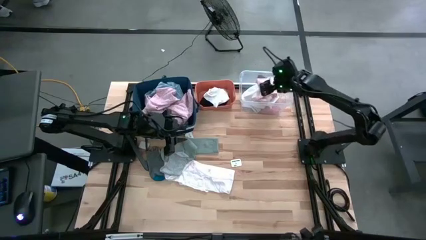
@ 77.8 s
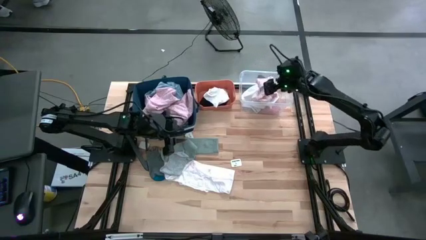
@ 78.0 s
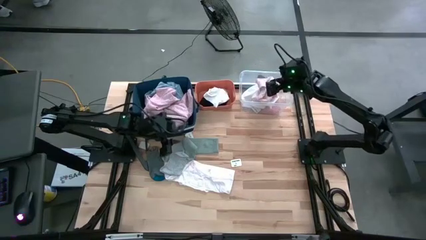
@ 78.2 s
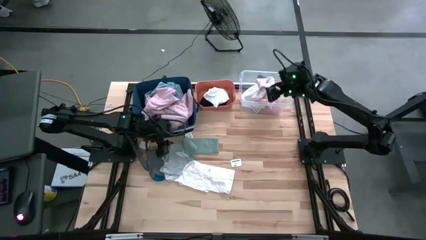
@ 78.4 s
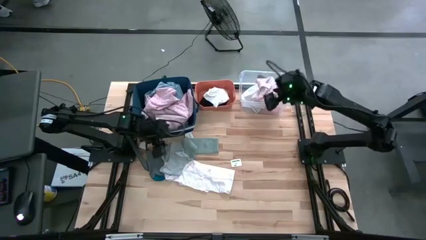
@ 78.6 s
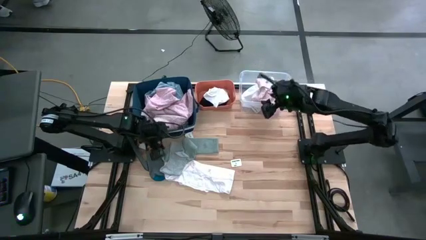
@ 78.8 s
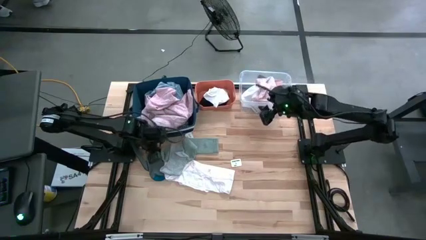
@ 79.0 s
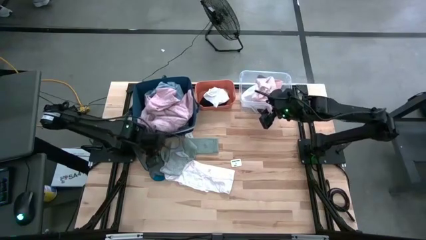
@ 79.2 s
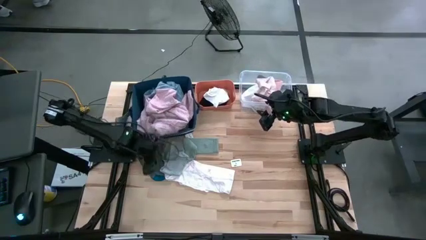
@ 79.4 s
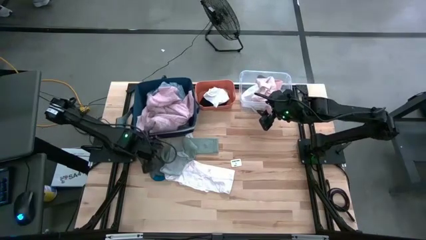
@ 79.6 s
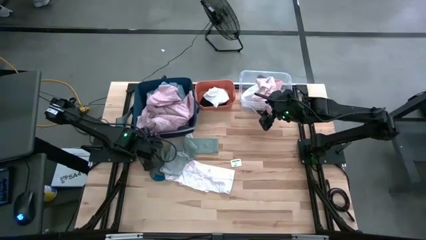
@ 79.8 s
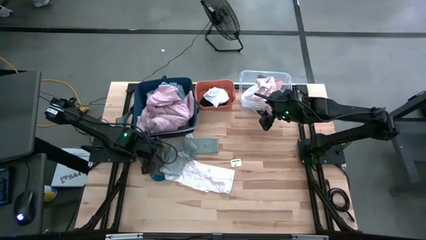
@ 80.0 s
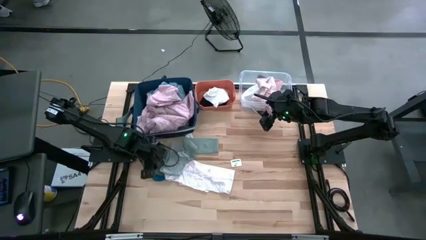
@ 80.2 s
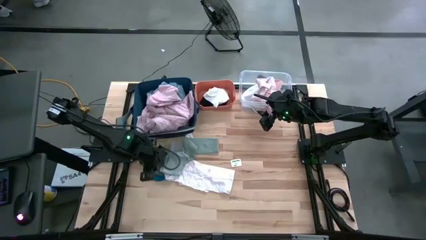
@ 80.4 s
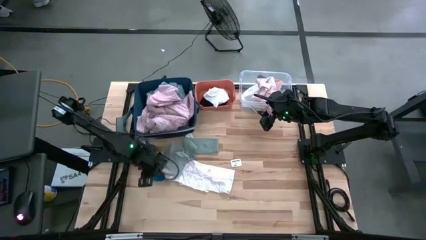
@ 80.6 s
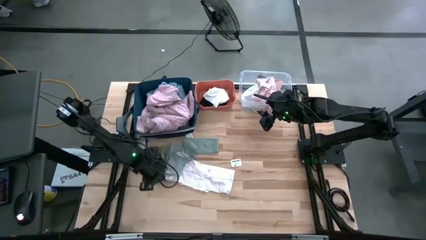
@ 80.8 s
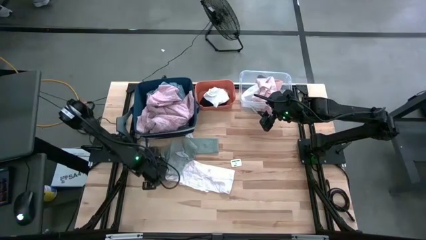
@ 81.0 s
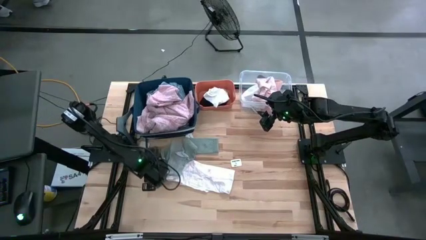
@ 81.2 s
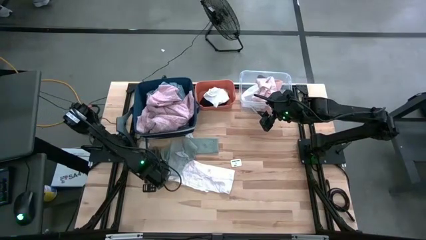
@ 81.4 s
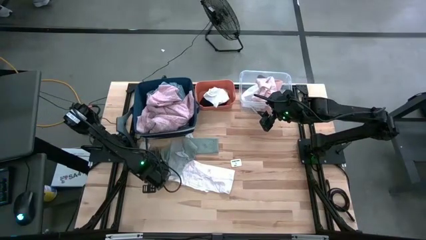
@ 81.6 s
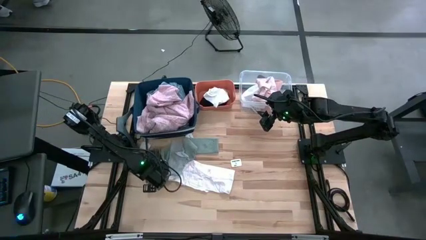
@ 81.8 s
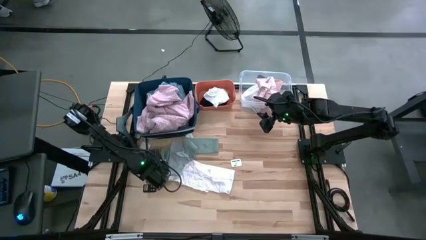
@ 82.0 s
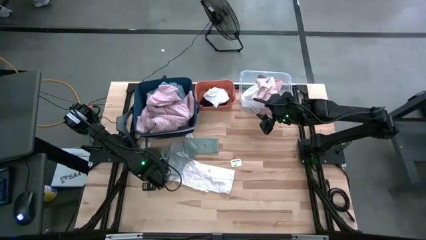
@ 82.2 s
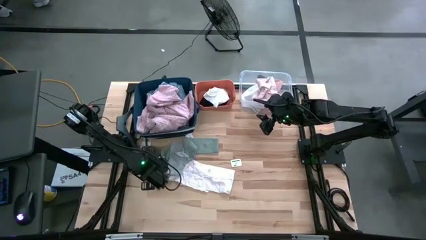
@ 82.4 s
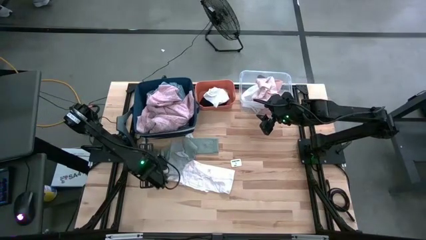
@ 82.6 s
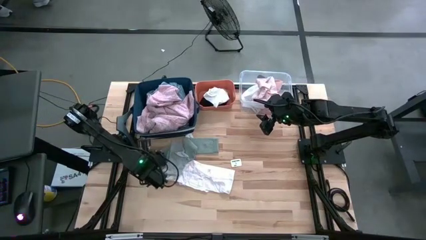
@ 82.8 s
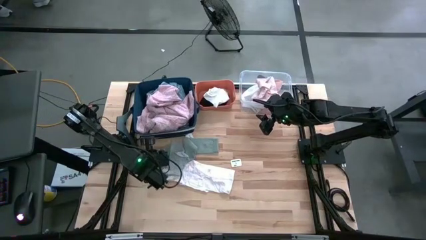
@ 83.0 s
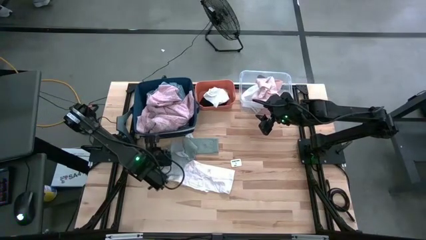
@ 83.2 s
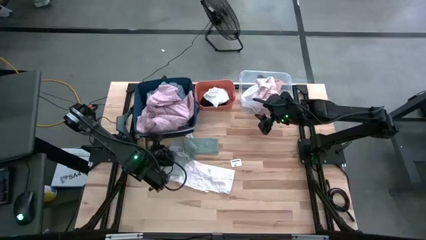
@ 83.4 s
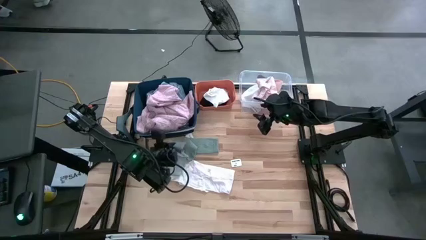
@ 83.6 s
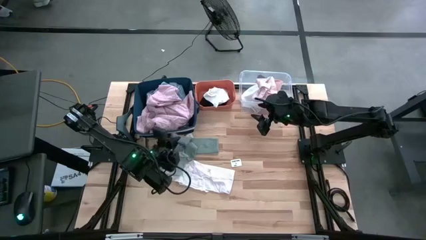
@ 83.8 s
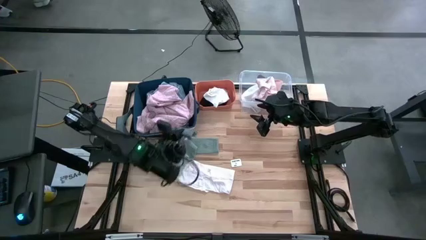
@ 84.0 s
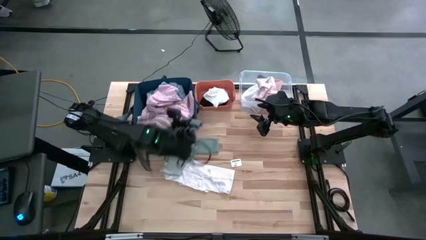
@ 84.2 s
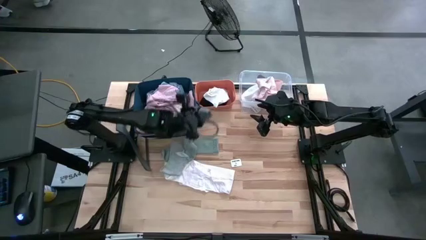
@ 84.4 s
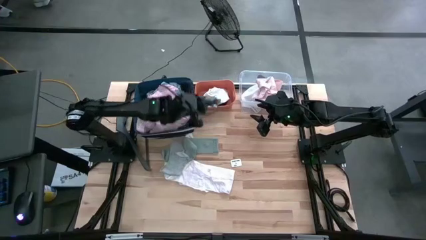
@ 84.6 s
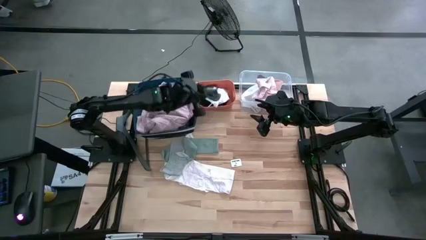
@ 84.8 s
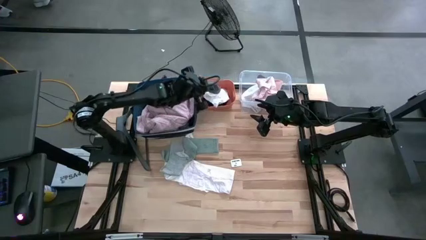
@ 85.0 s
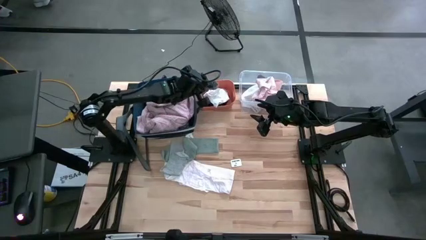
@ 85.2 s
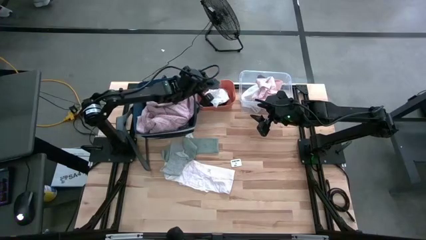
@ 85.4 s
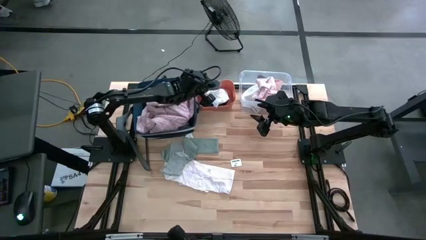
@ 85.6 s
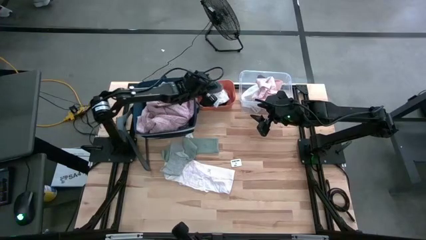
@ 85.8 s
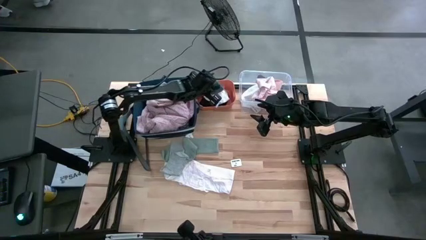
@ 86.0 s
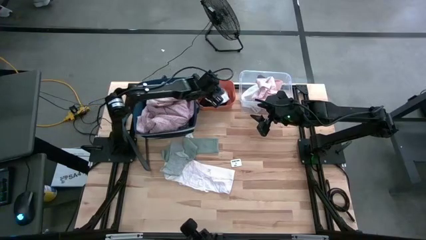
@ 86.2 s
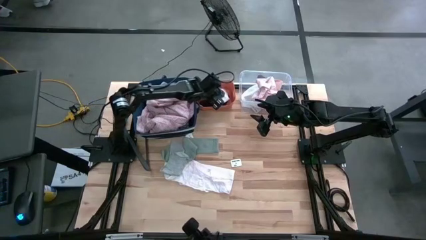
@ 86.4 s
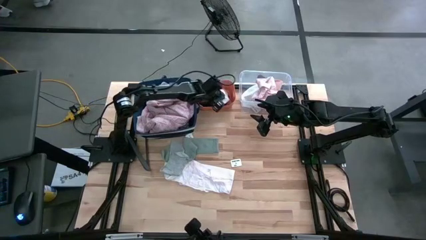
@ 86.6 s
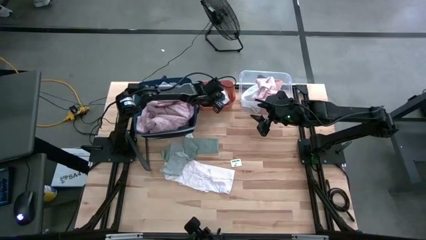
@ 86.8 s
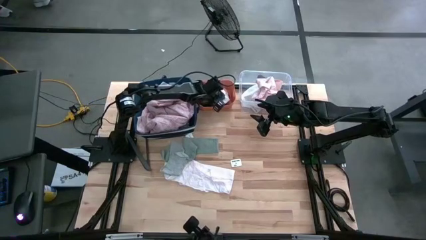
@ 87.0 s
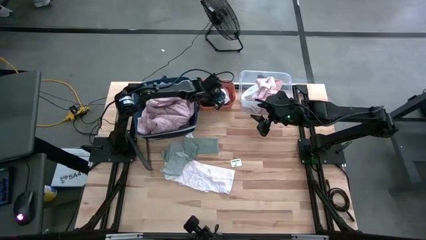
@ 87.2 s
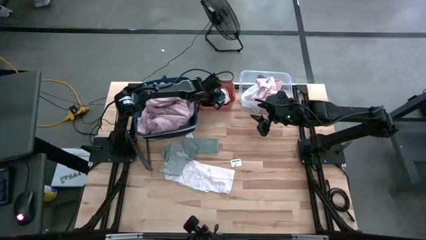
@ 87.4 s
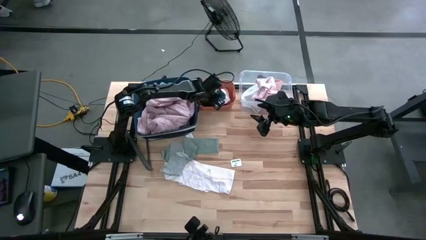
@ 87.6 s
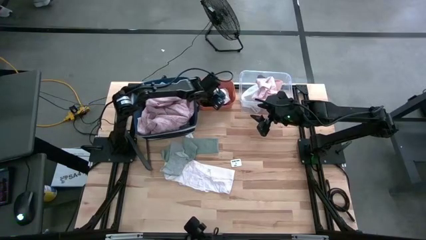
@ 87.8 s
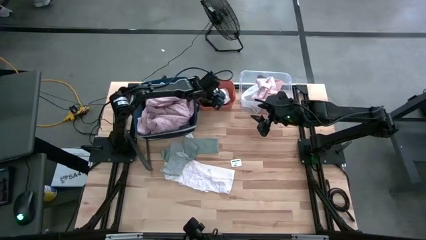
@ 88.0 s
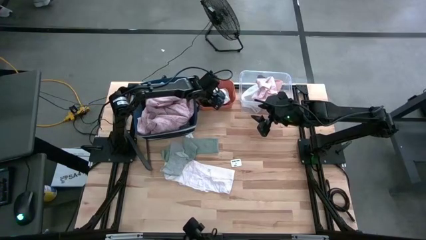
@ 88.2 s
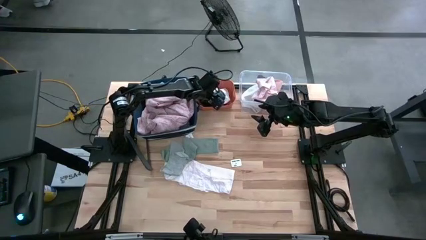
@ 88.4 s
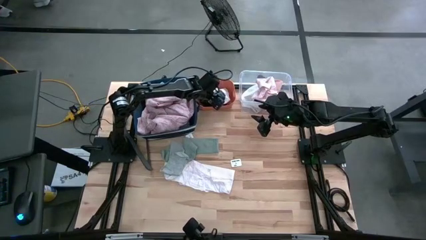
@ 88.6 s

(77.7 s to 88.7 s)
Task: Pick & Place Cloths
Put the dark gray sock into the orange bin

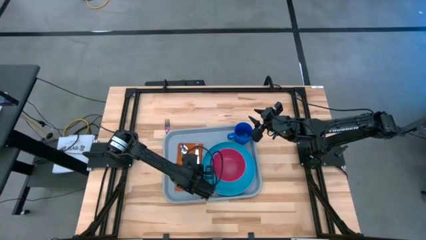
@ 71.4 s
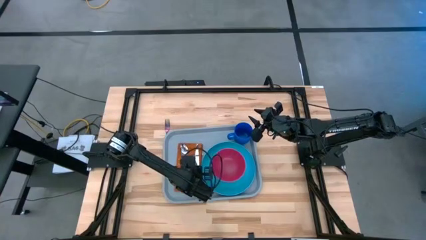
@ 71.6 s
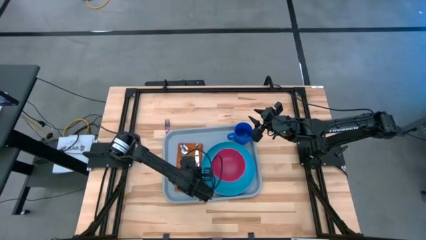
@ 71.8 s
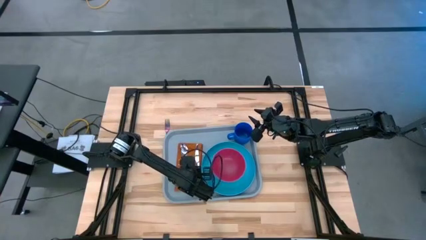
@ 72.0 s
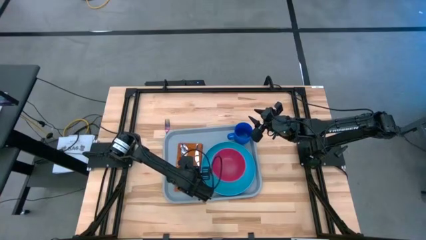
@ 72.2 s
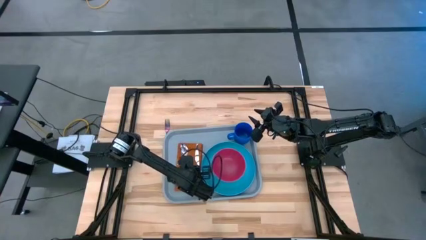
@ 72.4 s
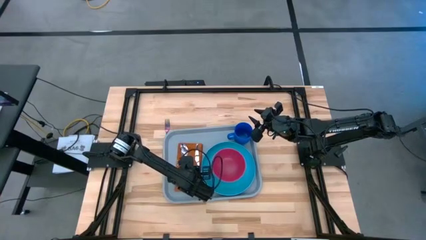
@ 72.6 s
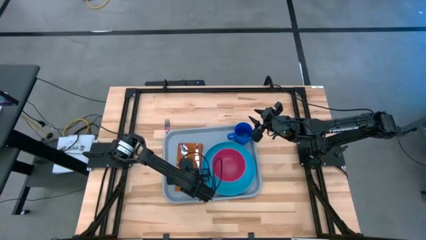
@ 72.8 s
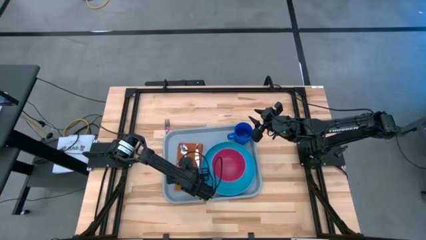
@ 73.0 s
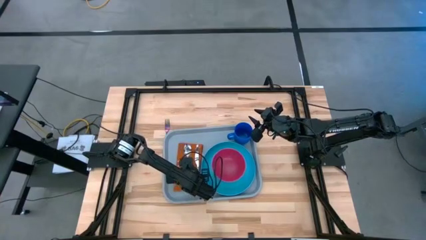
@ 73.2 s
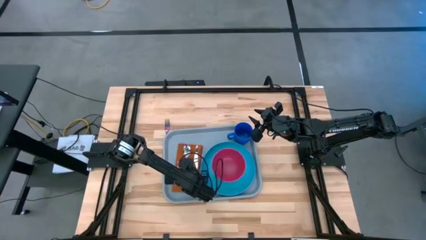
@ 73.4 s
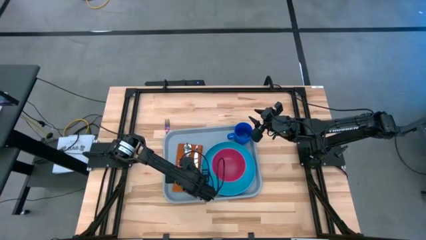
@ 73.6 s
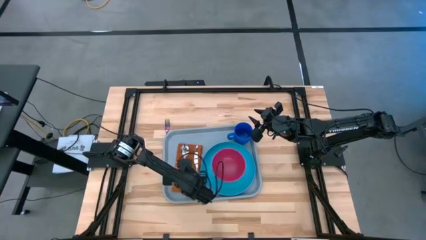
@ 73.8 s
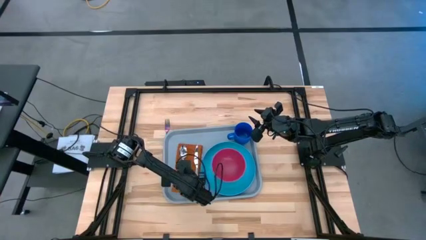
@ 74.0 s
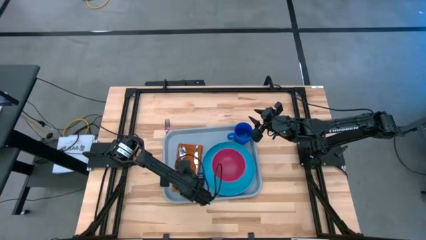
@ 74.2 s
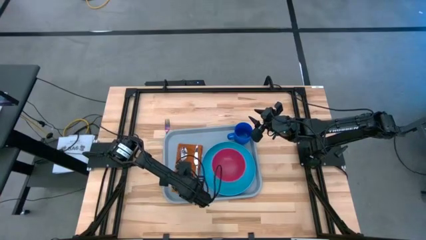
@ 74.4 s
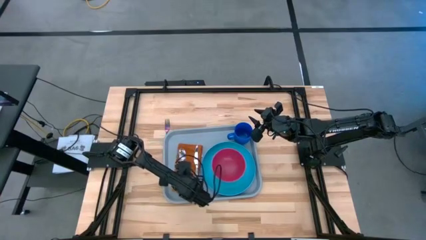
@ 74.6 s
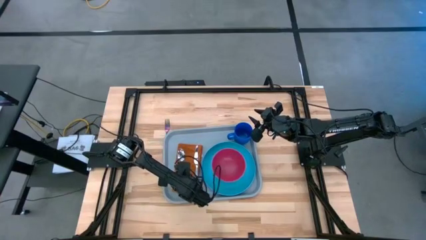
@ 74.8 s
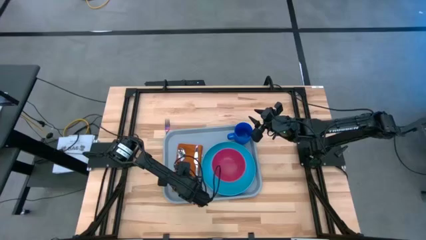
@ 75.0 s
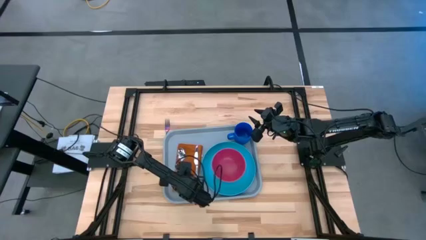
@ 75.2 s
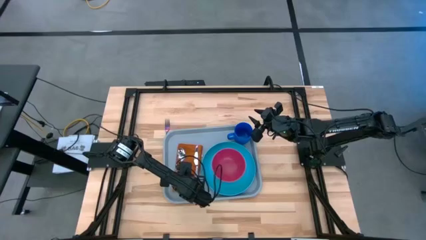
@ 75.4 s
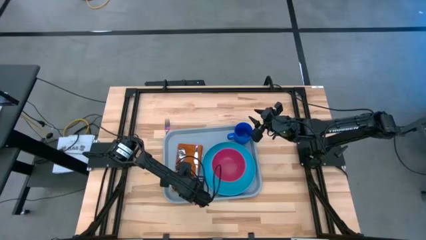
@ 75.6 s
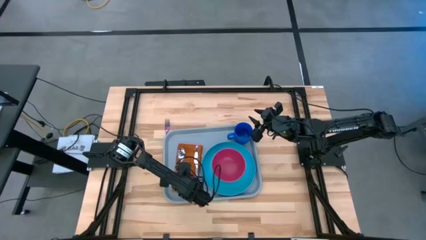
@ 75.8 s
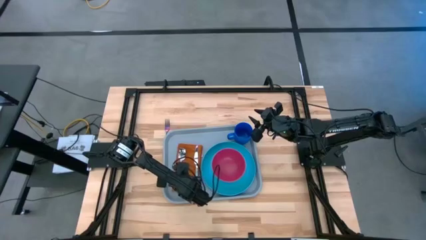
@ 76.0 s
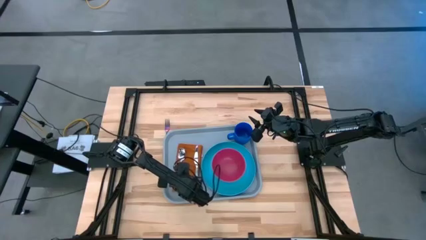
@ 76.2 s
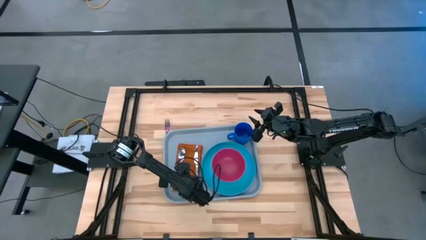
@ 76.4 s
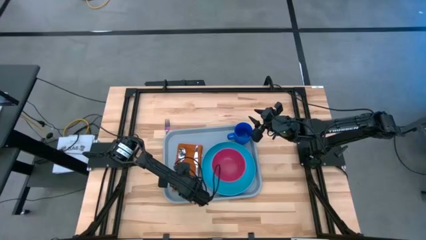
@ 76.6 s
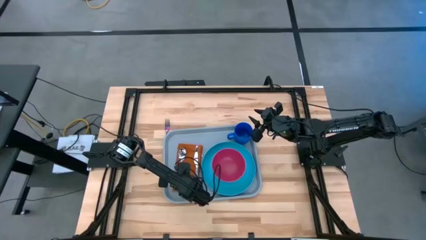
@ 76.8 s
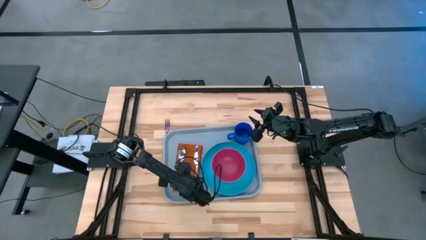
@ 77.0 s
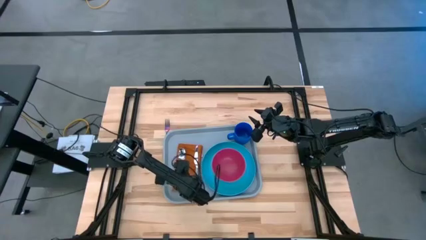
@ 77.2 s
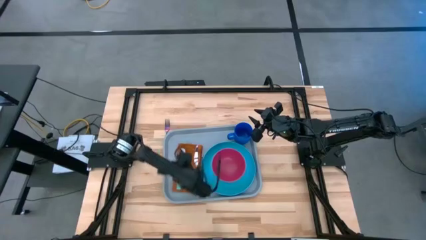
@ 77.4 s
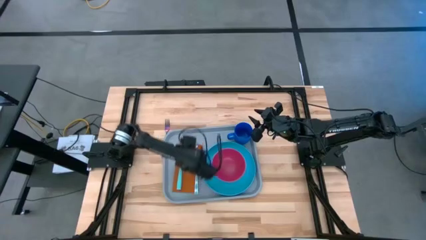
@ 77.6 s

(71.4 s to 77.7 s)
Task: Set up tray
Adjust the green spoon
